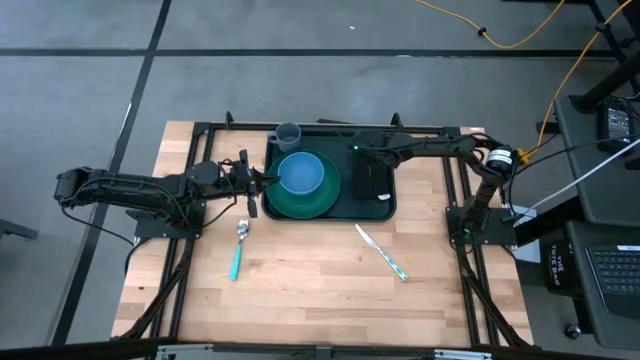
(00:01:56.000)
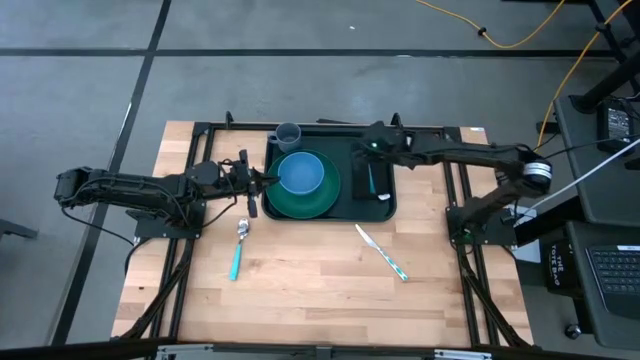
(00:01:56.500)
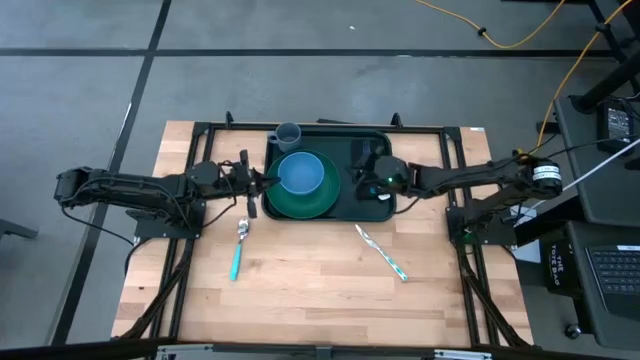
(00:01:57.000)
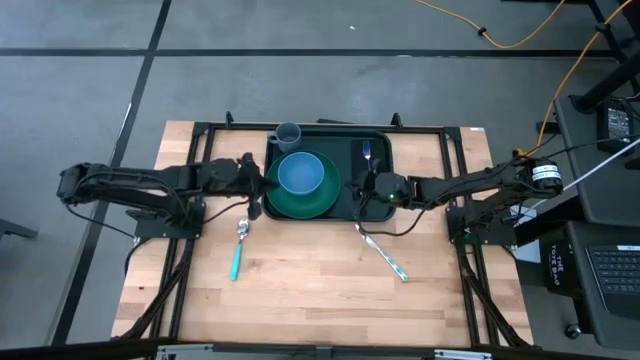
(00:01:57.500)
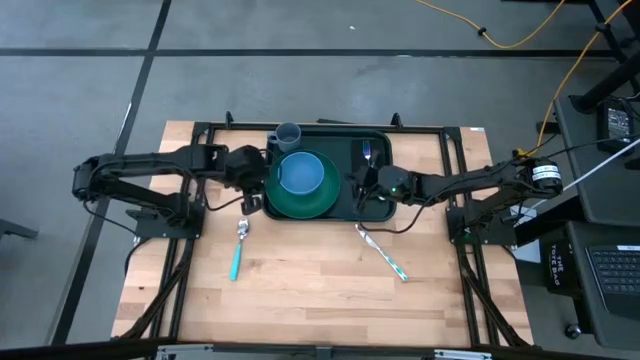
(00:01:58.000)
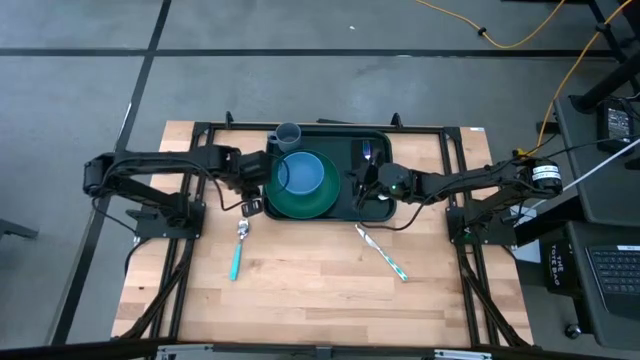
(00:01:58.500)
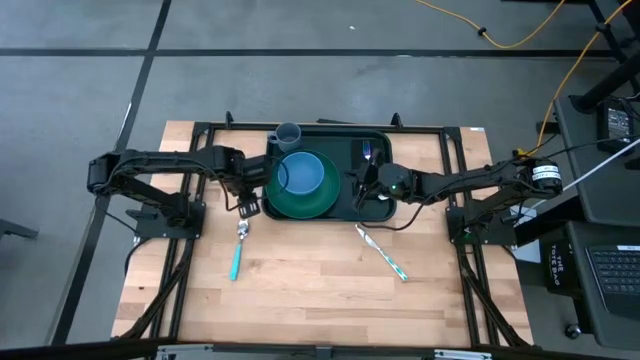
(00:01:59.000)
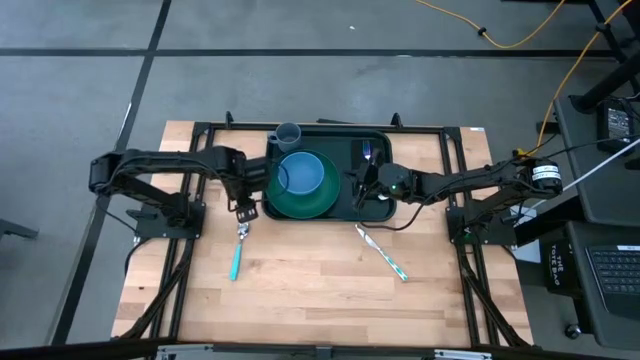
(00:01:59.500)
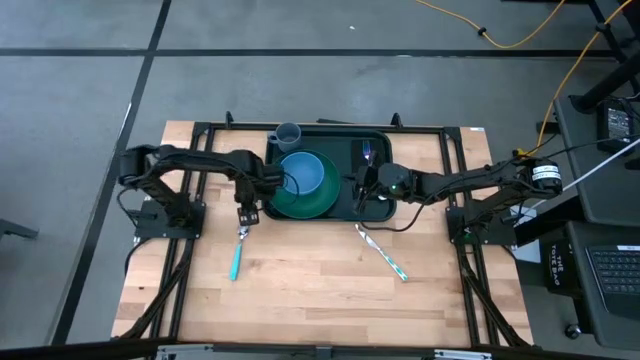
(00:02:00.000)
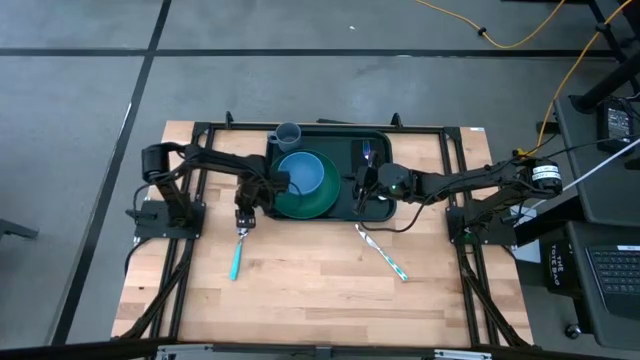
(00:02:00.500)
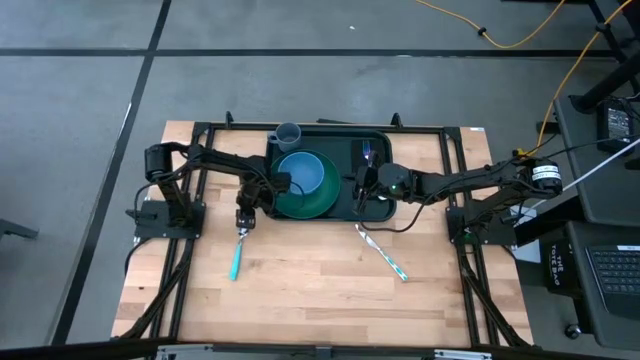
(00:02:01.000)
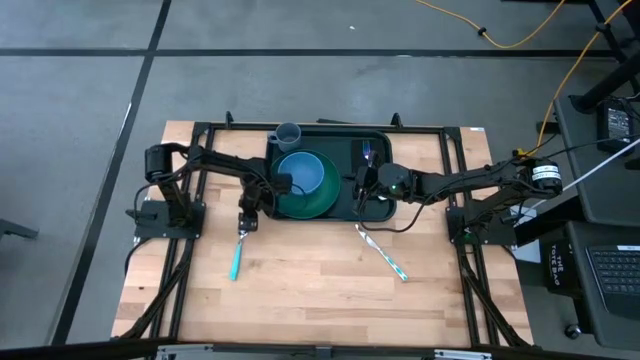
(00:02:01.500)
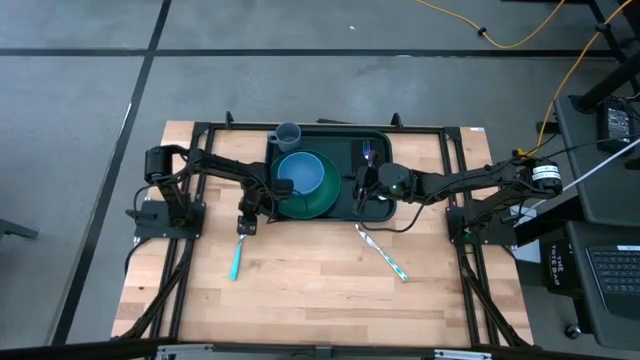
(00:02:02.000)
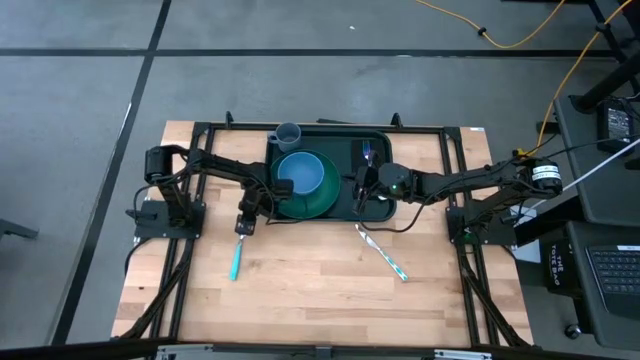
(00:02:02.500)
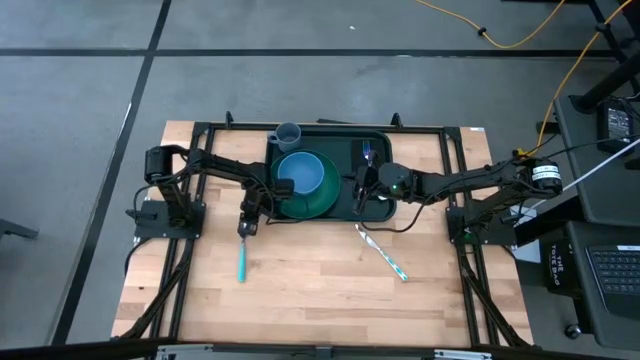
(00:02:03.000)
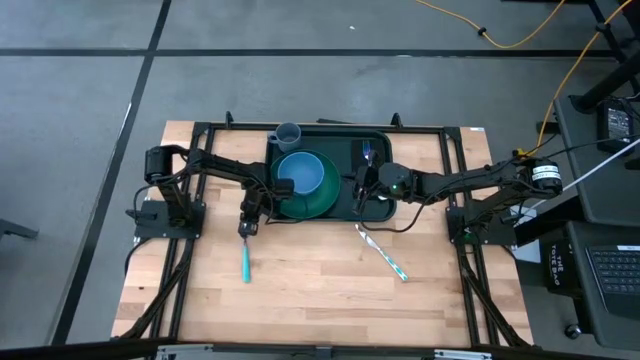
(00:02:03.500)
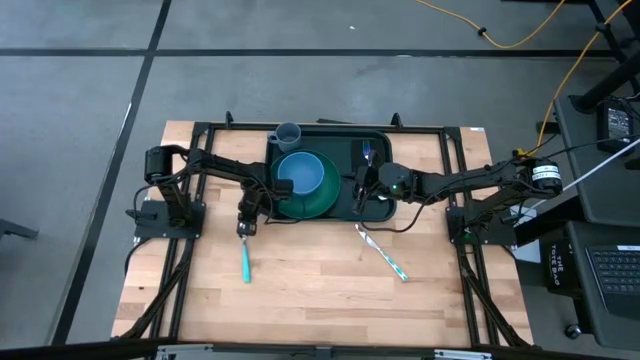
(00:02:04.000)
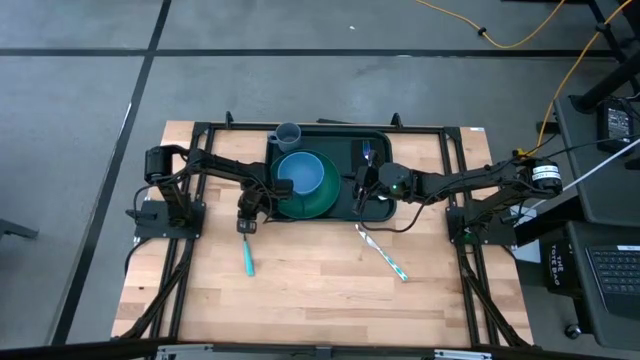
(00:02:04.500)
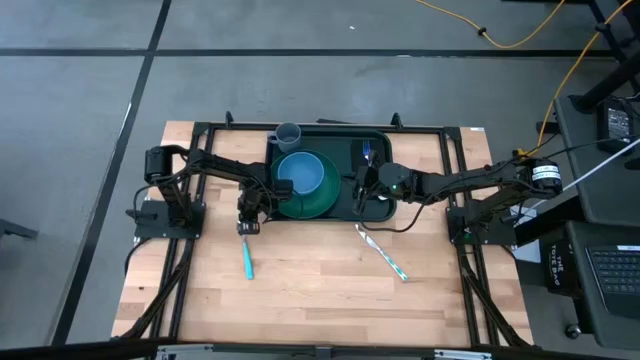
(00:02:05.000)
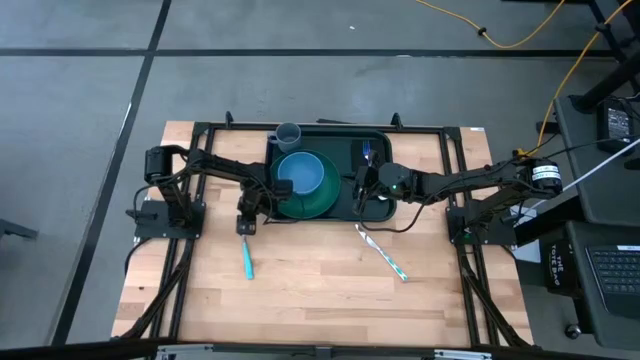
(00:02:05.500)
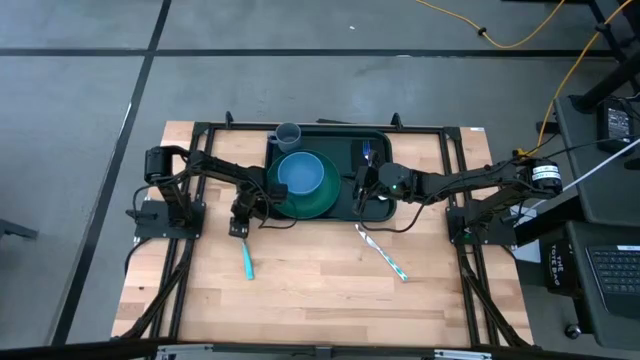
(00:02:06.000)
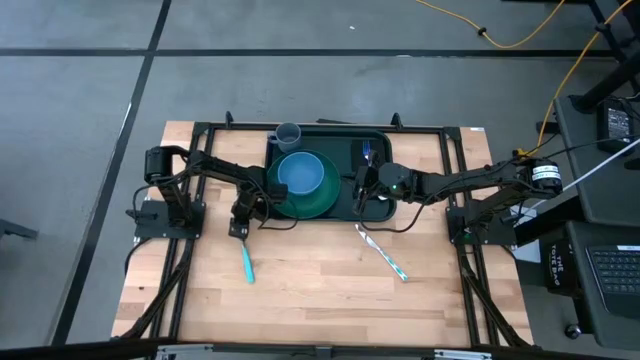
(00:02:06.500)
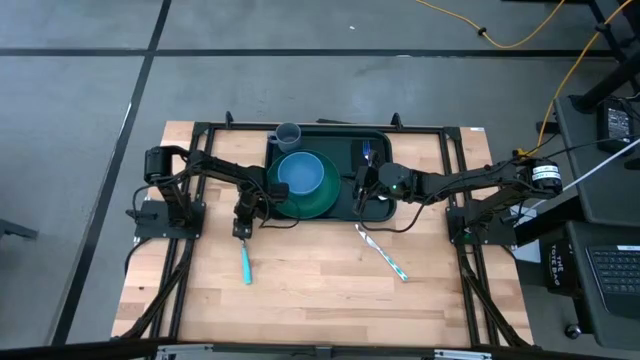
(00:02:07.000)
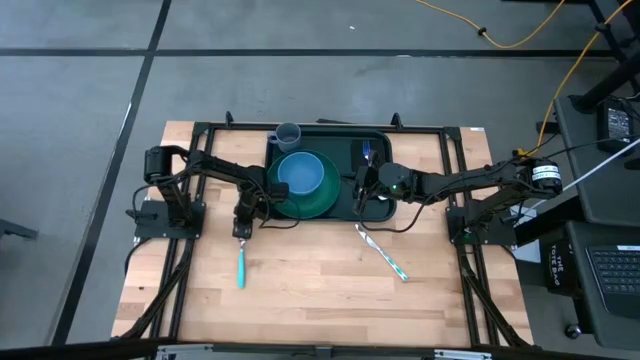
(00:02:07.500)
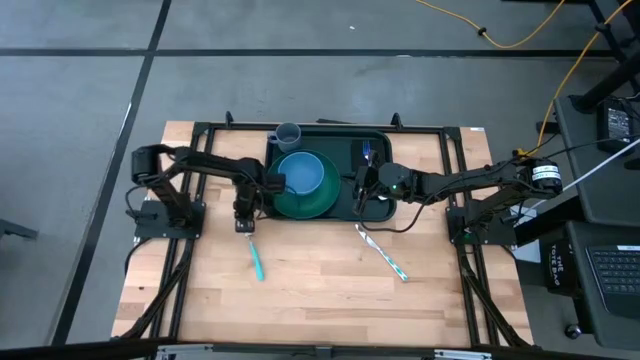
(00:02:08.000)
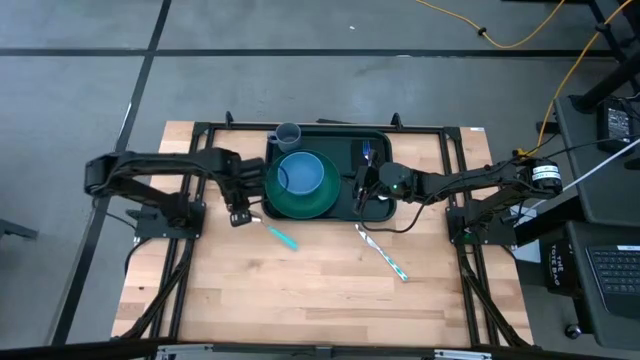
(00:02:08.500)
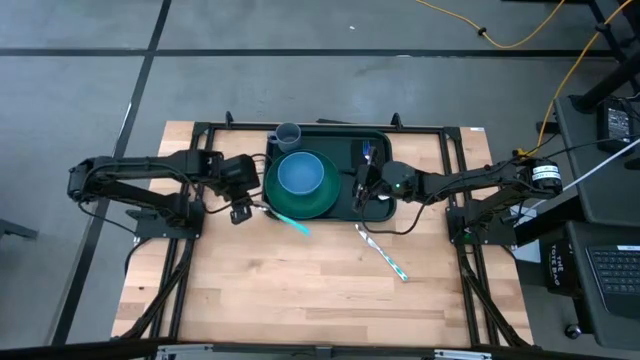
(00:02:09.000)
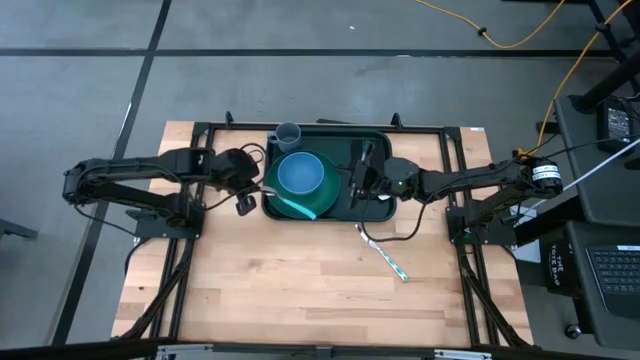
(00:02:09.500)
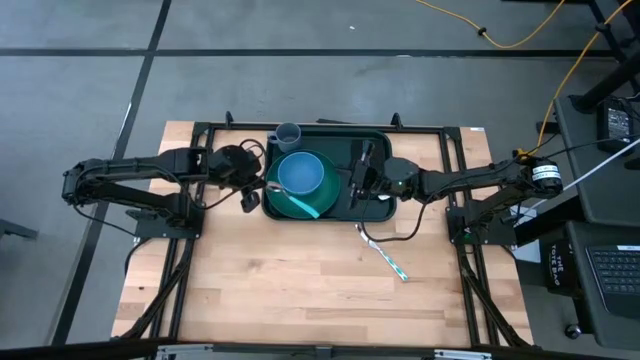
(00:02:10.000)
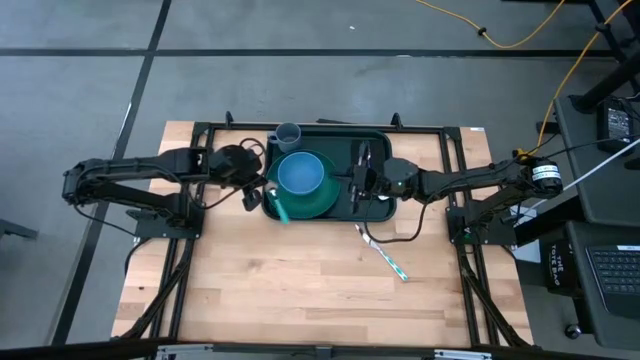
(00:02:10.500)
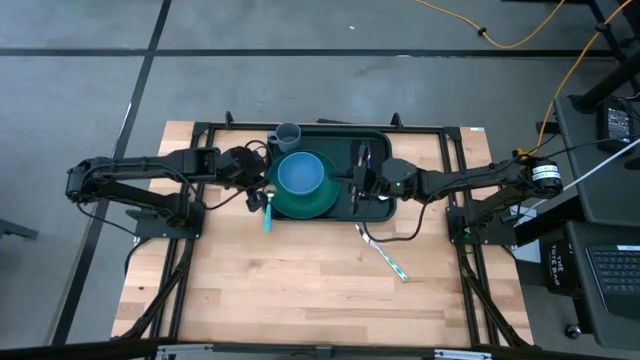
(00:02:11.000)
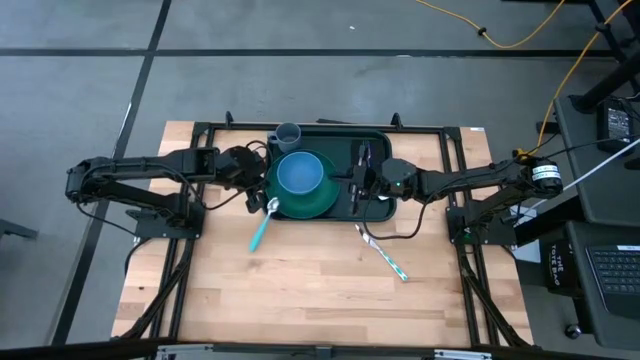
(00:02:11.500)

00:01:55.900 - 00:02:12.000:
Task: Set up tray
Put the light blue spoon on the black table napkin to the left of the blue fork

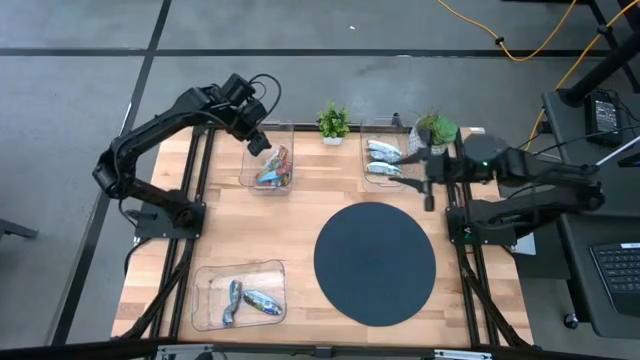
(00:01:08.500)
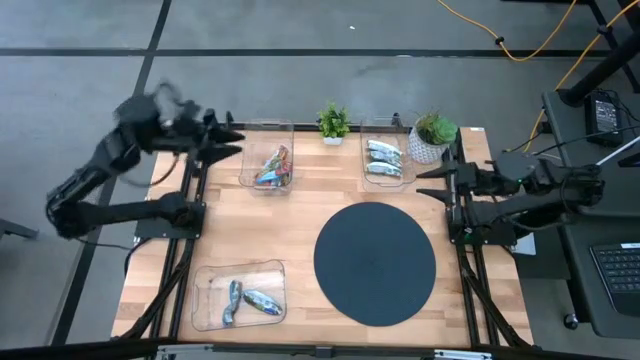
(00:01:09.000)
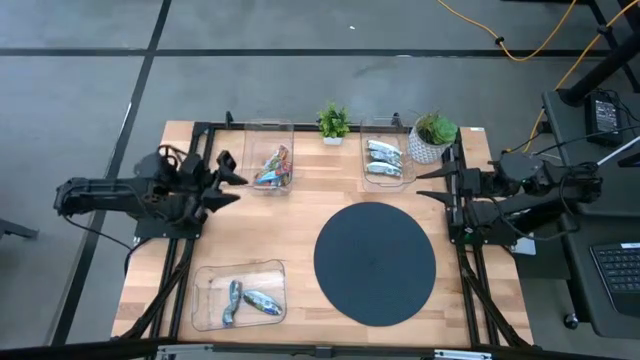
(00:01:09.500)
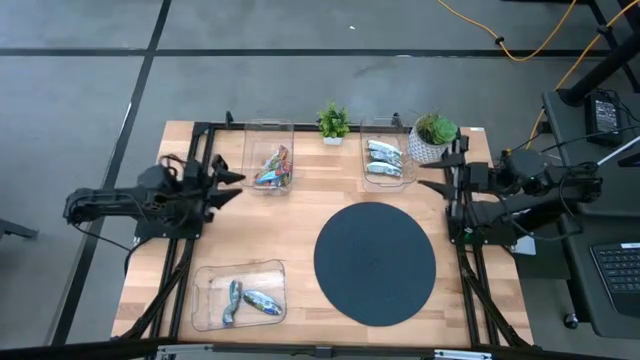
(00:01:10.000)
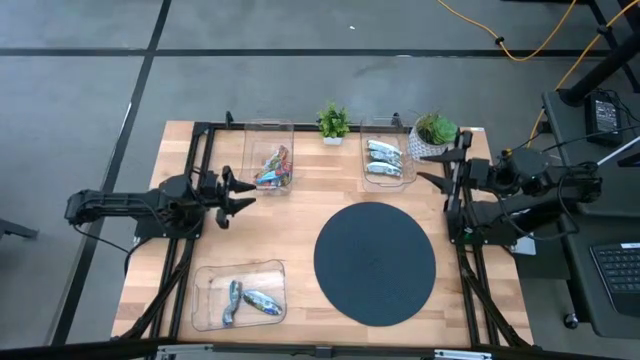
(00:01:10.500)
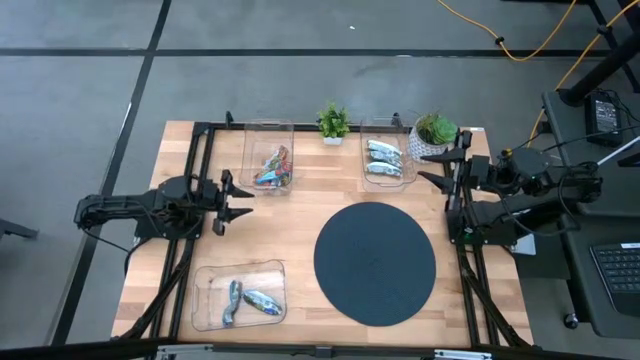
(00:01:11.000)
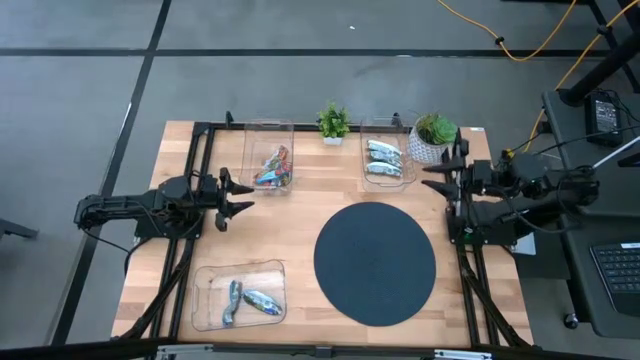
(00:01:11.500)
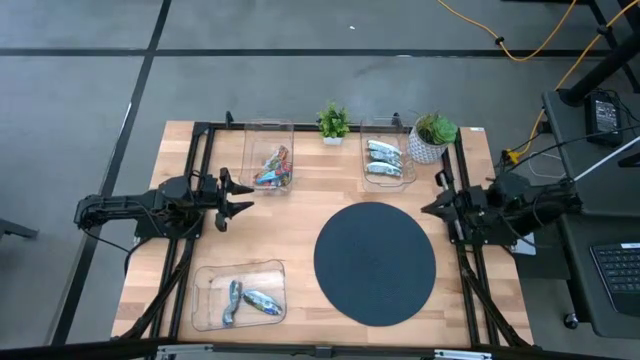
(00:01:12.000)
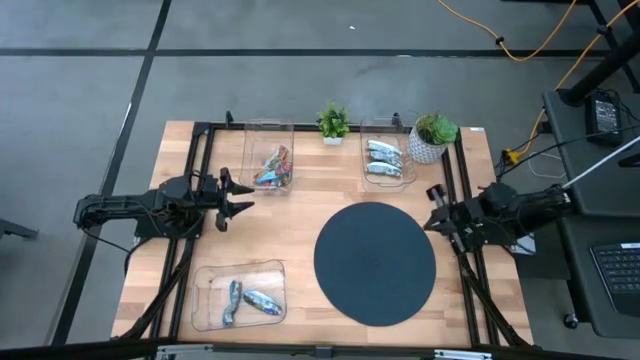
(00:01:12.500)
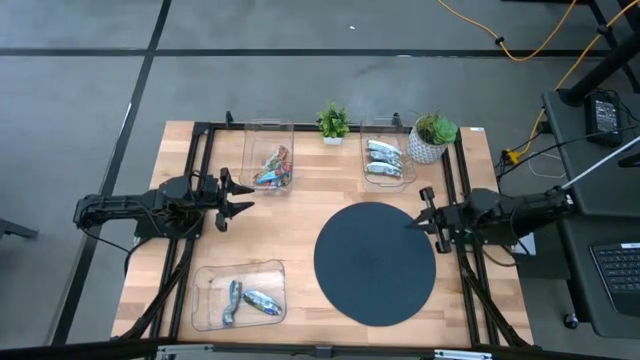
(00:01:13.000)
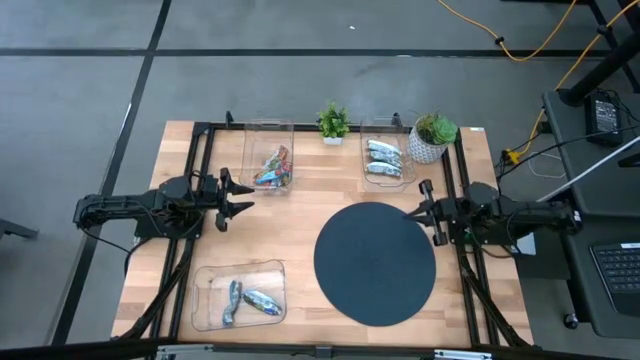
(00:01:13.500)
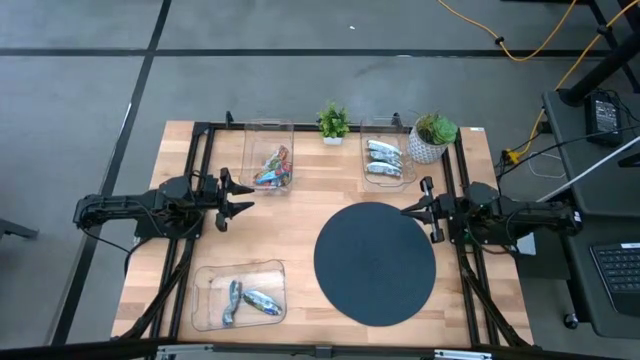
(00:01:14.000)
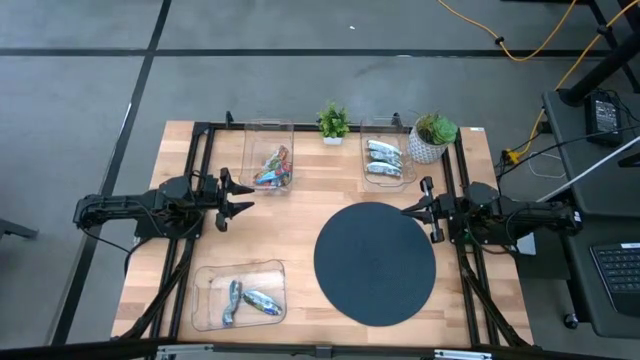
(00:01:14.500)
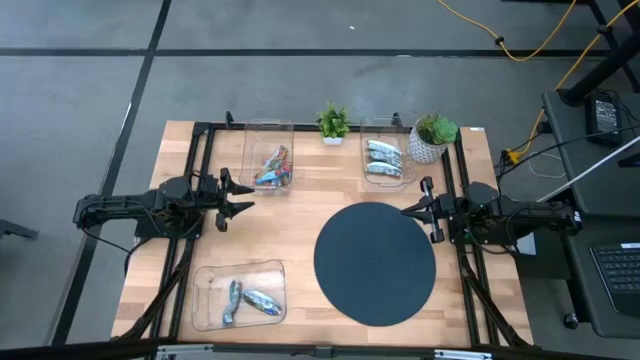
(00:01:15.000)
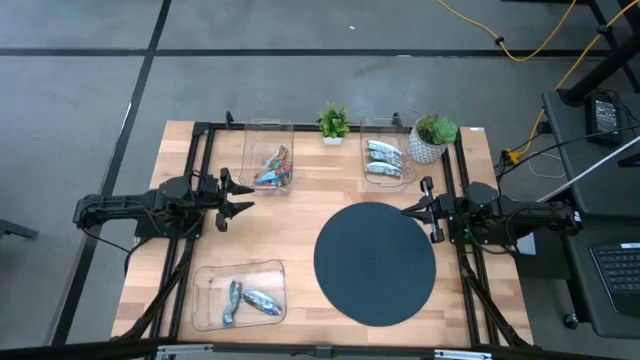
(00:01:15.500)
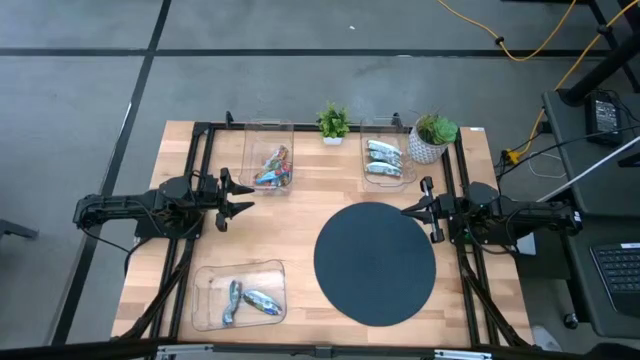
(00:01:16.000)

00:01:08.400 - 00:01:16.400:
Task: Pick and place Granola Bars by type
Return to Home Position
